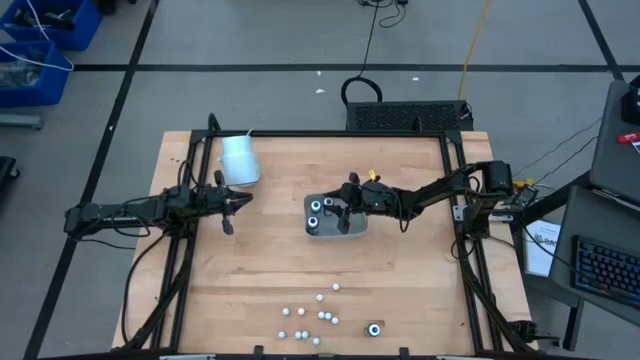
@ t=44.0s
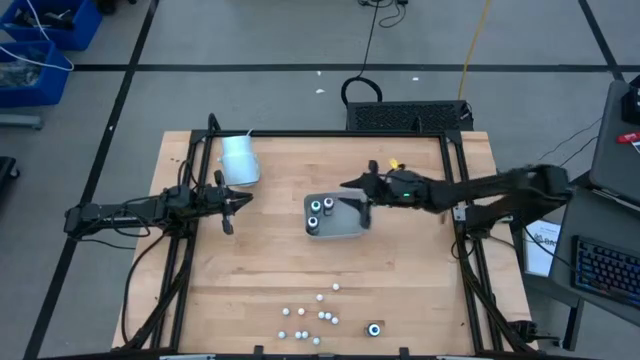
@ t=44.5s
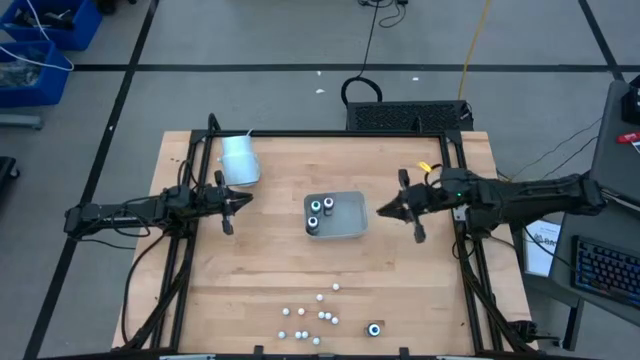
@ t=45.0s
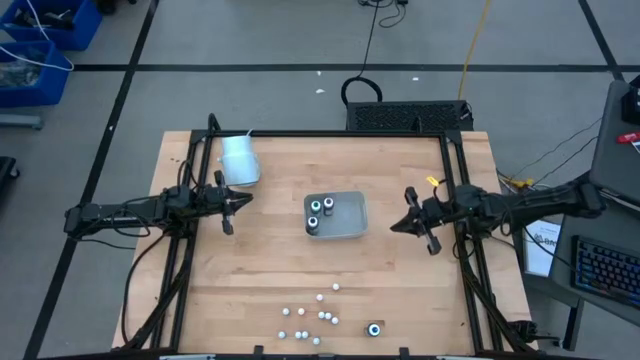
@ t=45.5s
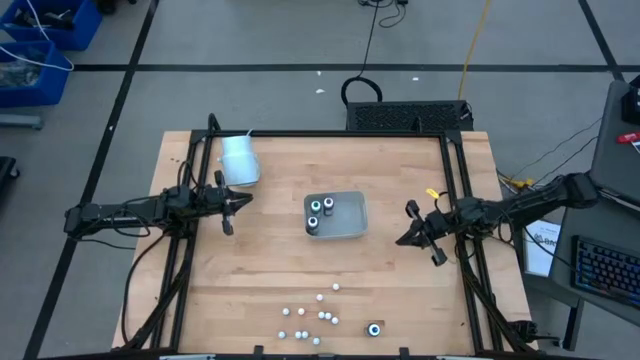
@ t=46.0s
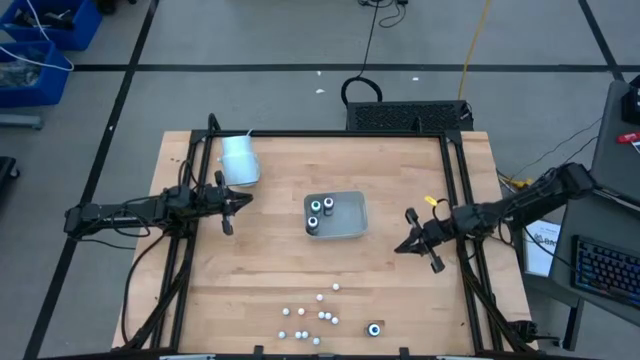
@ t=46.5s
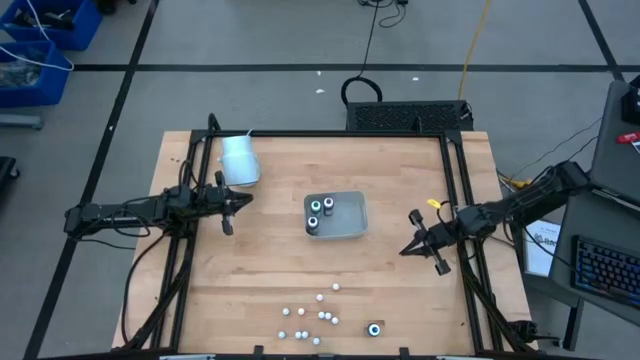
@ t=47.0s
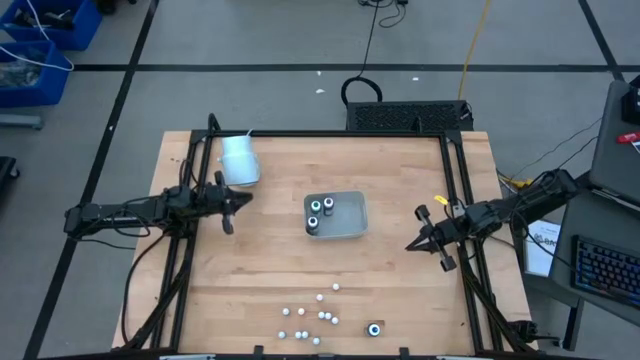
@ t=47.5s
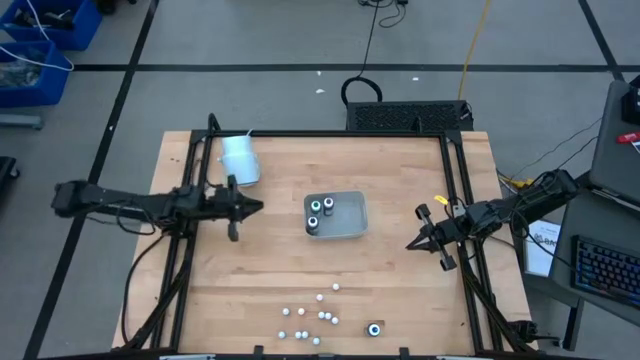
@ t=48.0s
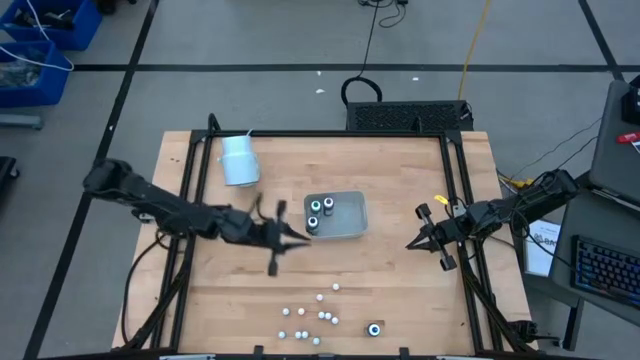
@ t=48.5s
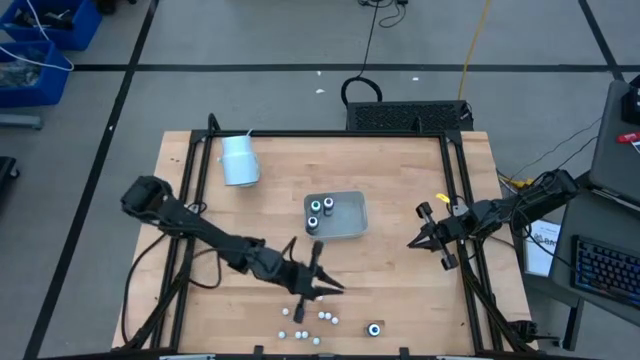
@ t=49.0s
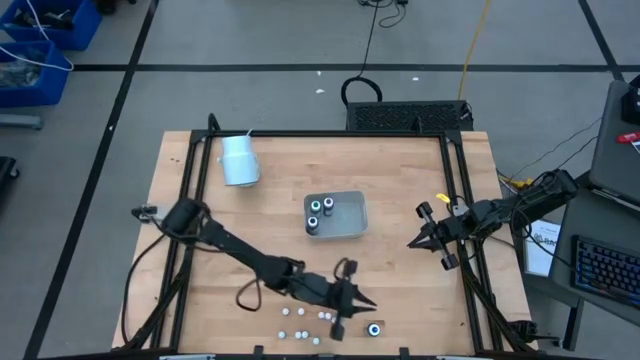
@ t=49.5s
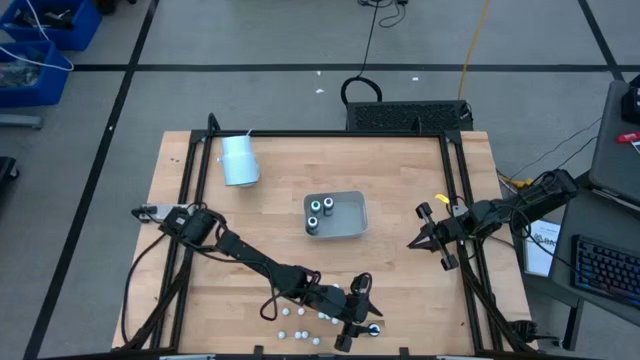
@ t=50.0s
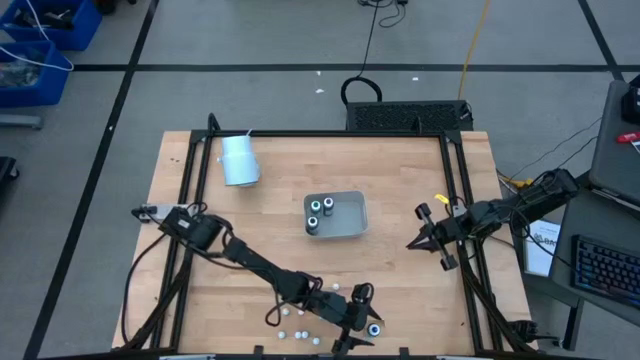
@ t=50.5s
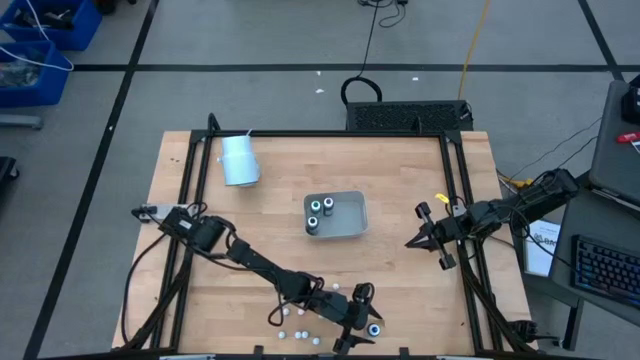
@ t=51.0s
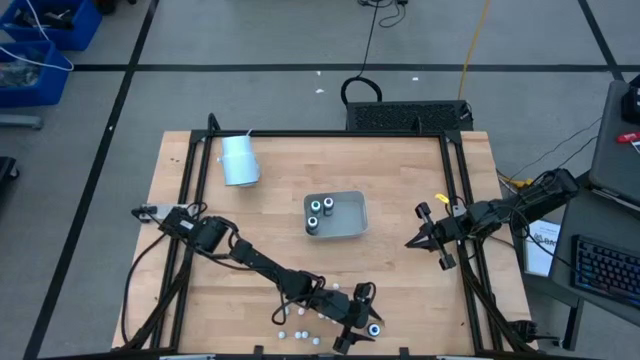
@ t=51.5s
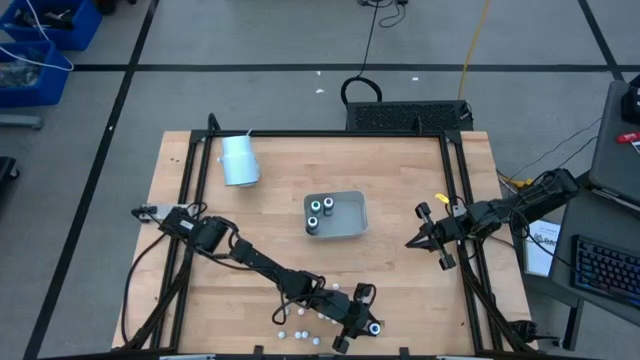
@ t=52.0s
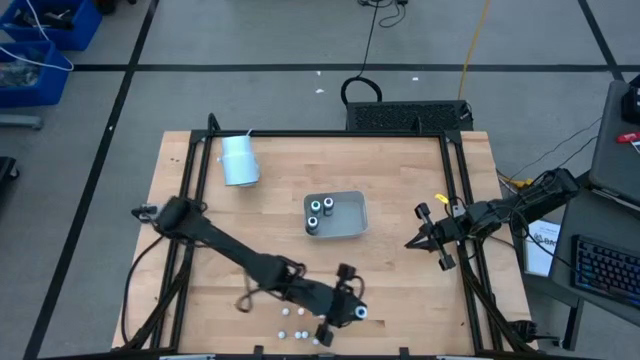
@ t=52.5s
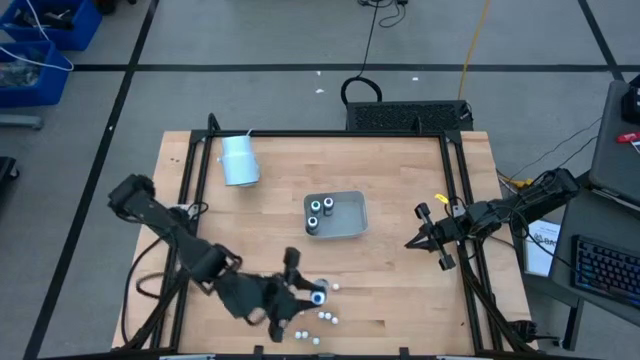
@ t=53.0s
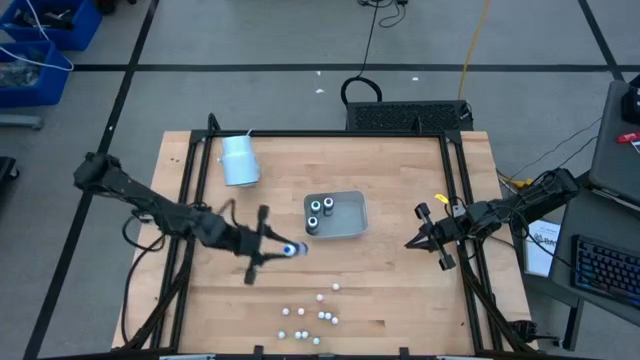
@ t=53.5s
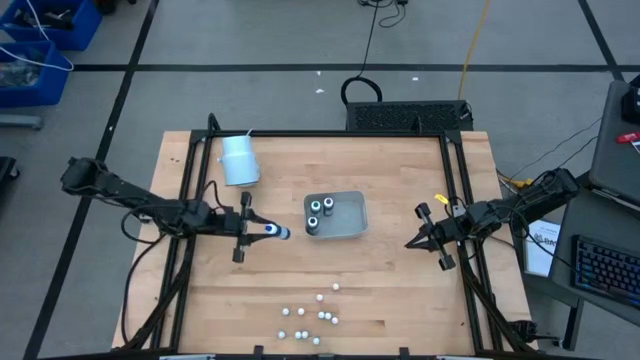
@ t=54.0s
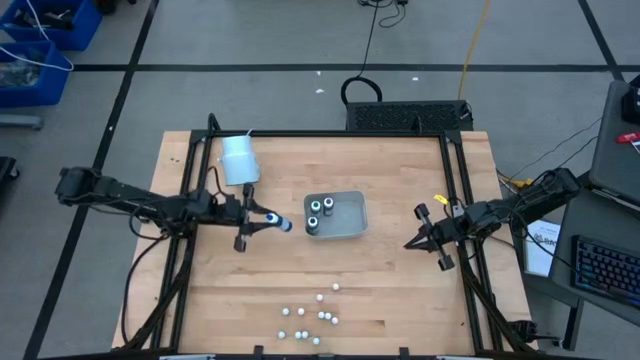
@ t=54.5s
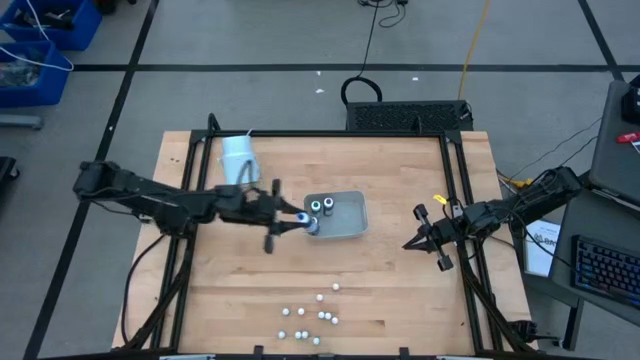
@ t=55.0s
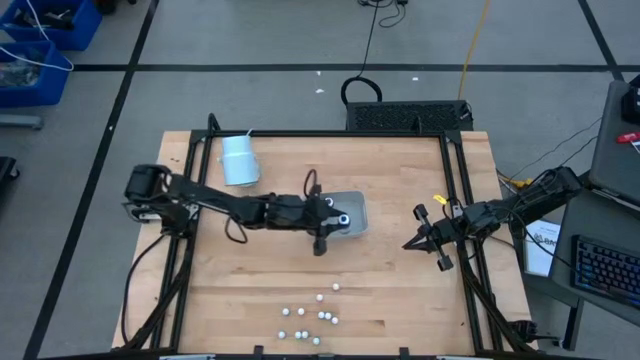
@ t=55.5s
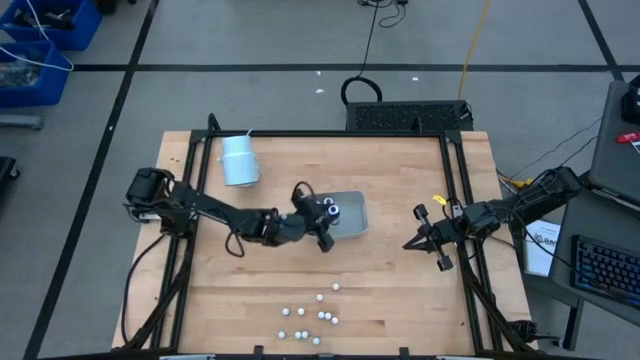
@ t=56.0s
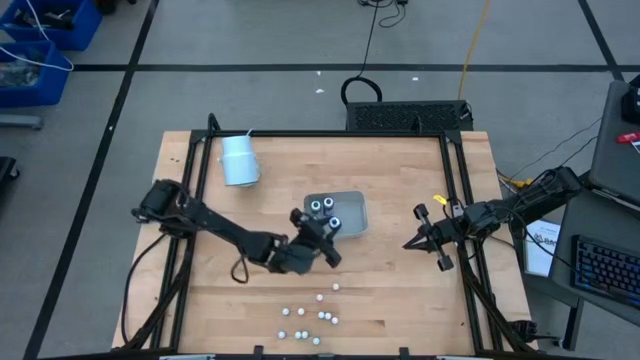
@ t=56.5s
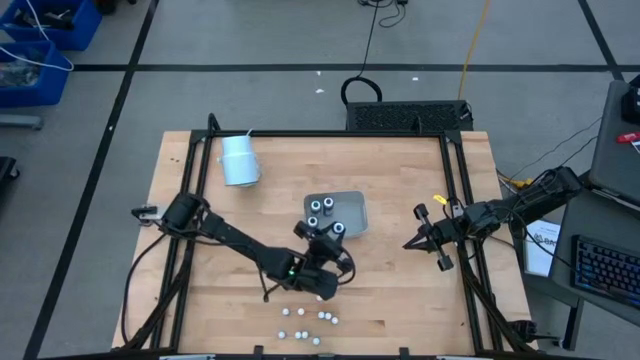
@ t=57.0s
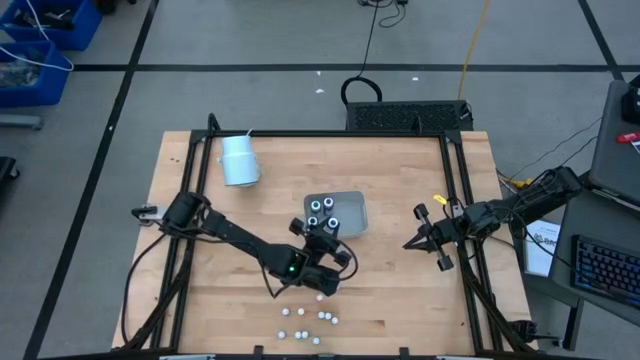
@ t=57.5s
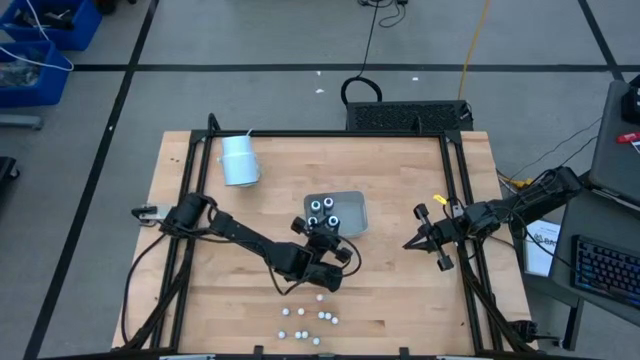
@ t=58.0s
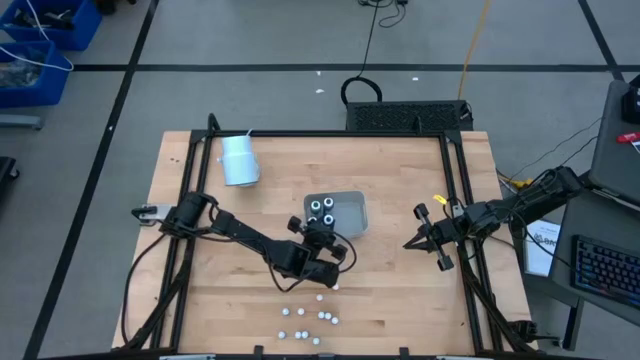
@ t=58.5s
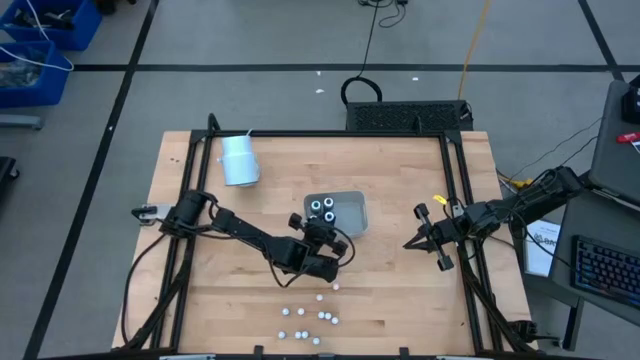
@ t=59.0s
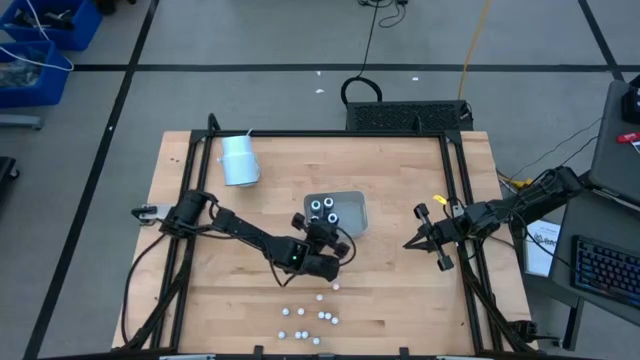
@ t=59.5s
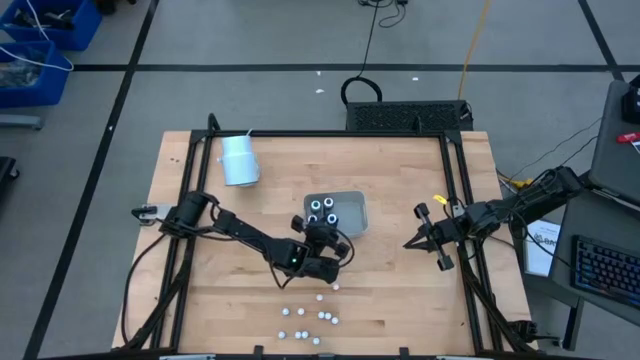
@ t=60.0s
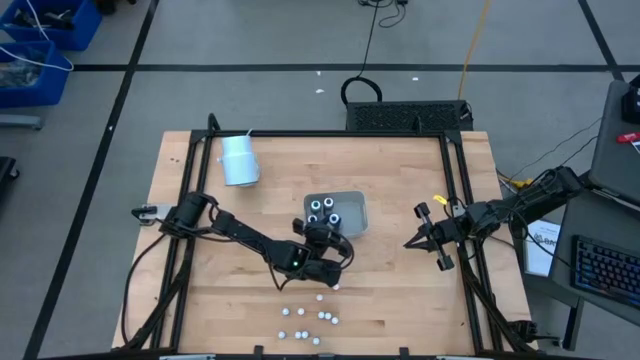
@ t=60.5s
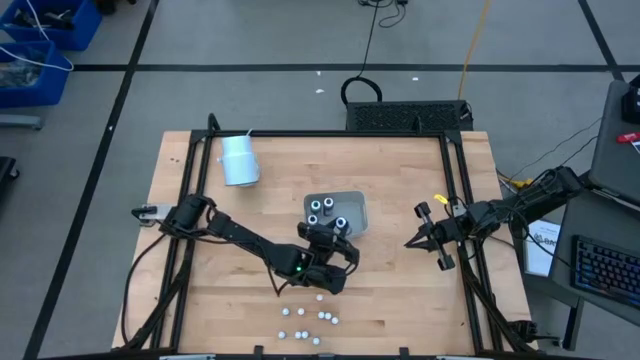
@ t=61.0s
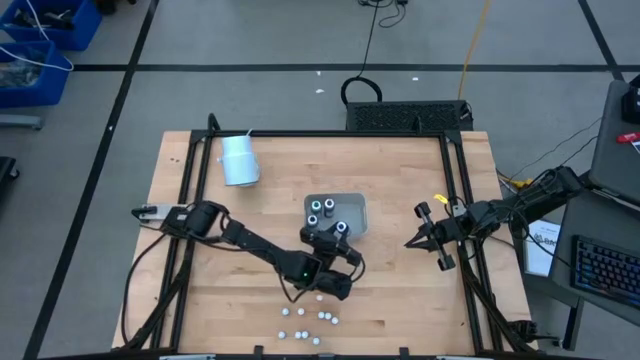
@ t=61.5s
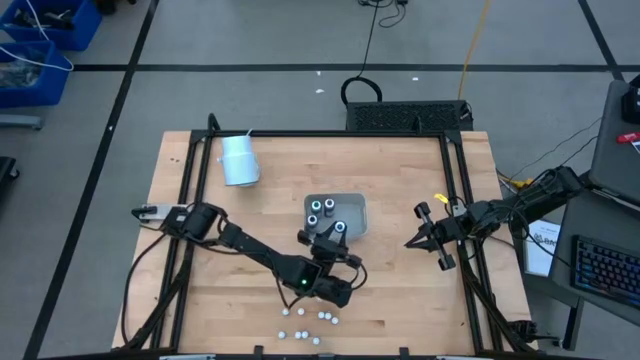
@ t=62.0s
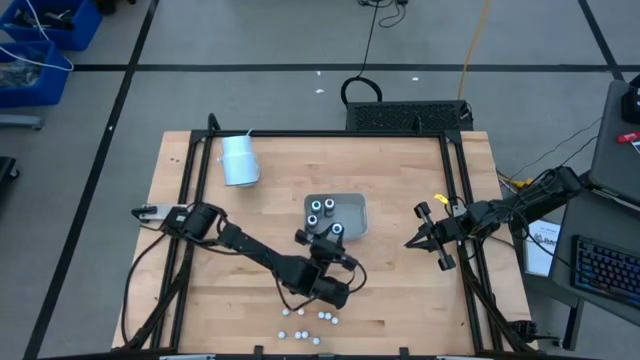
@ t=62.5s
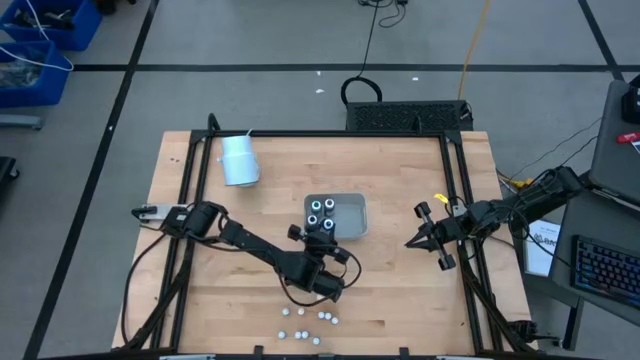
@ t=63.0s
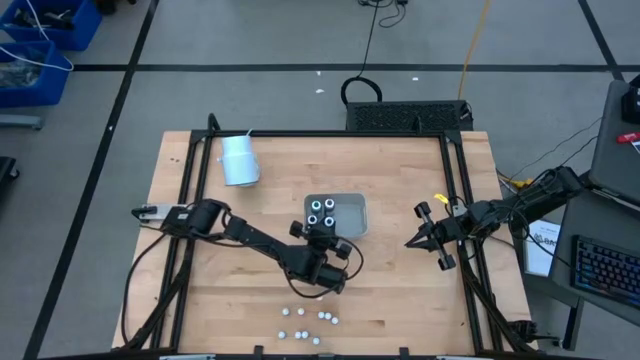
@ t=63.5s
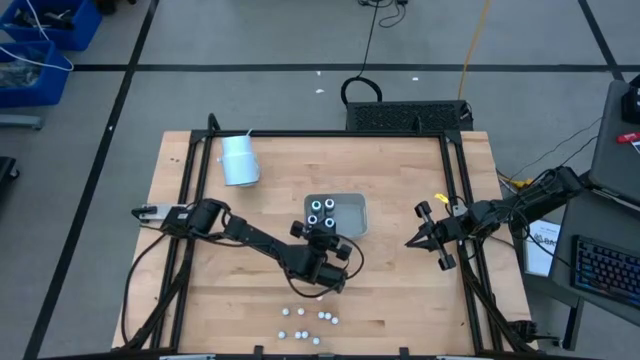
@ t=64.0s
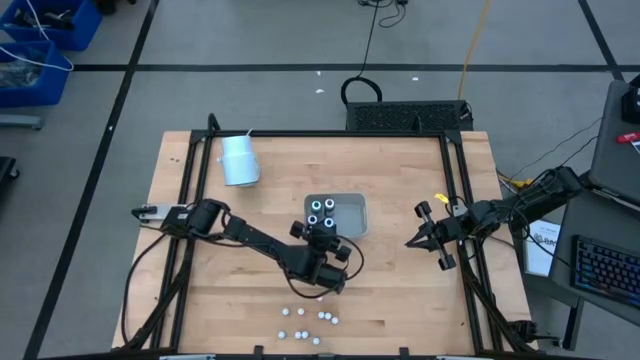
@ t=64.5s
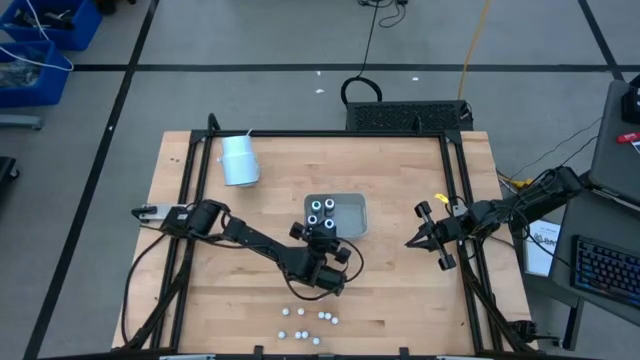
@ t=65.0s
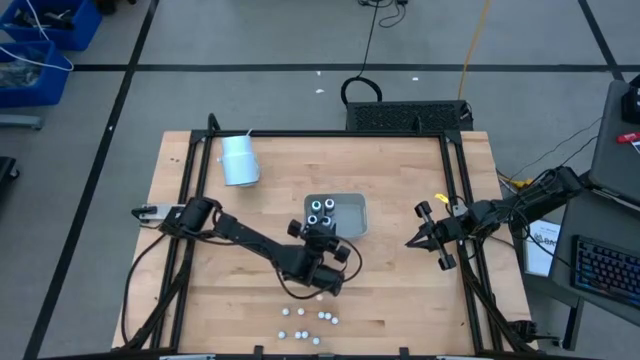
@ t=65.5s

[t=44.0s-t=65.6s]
Task: Pick & Place food coloring
Put the large blue food coloring bottle into the bin
